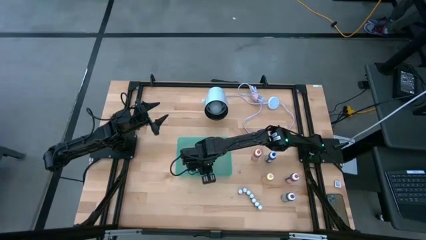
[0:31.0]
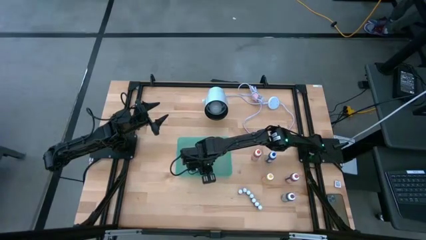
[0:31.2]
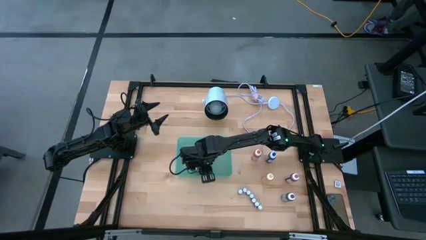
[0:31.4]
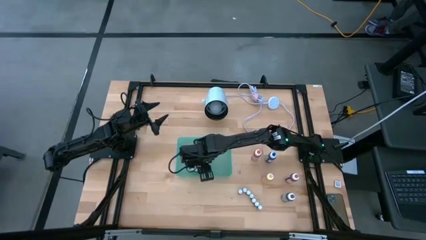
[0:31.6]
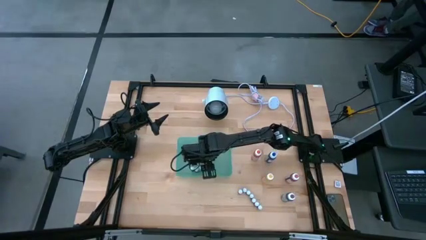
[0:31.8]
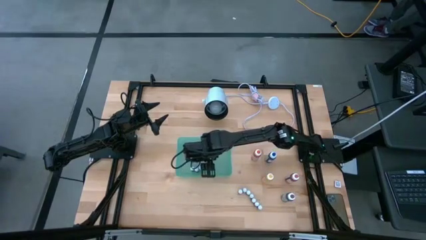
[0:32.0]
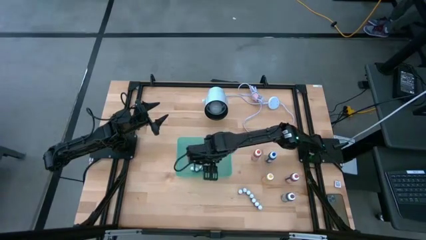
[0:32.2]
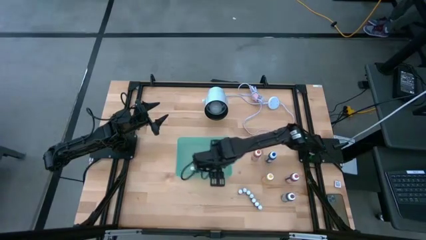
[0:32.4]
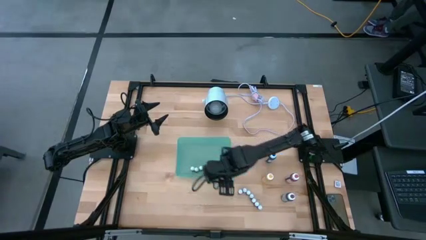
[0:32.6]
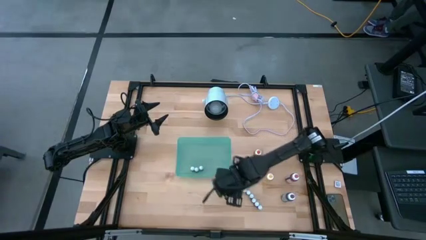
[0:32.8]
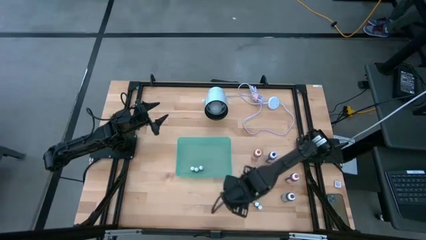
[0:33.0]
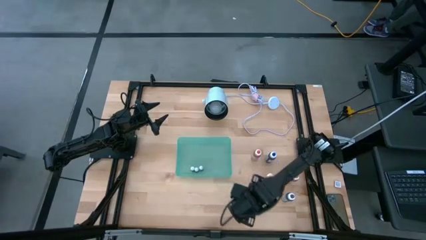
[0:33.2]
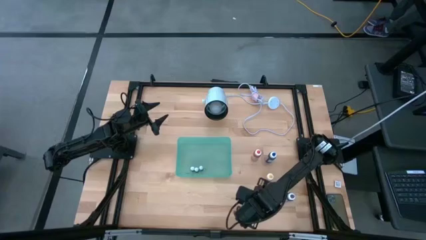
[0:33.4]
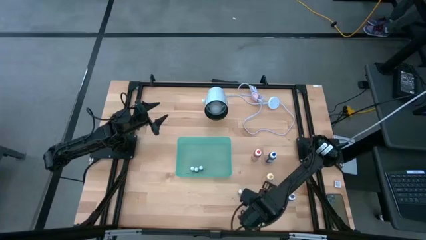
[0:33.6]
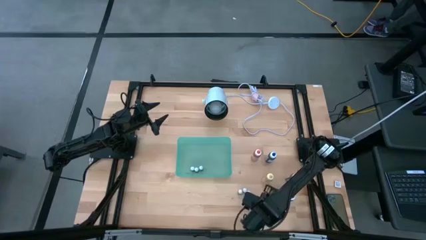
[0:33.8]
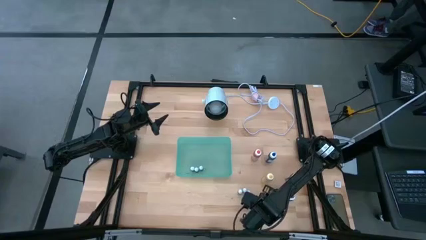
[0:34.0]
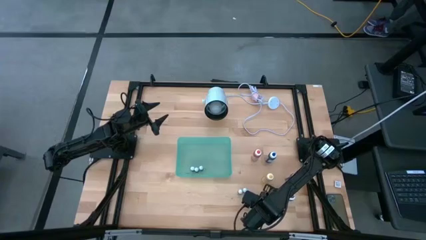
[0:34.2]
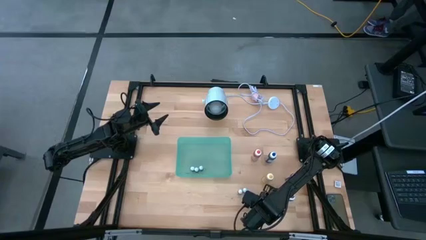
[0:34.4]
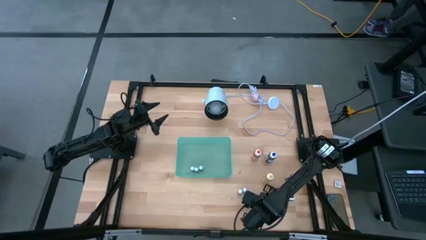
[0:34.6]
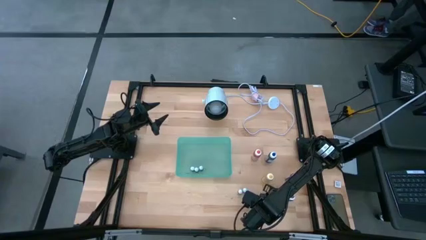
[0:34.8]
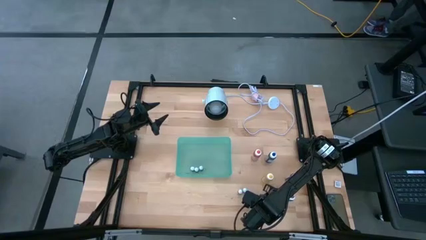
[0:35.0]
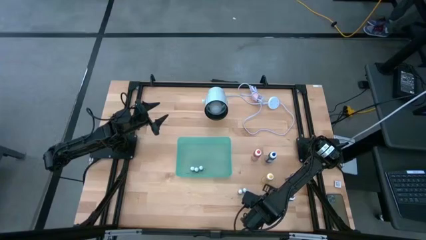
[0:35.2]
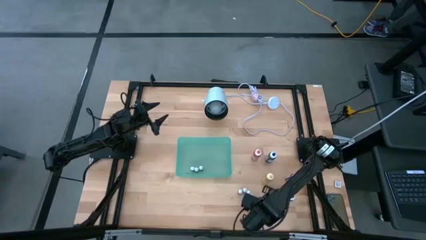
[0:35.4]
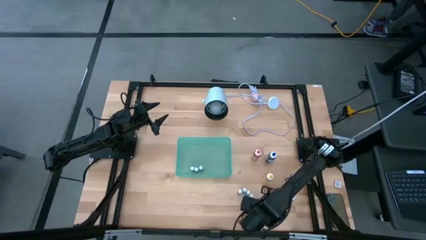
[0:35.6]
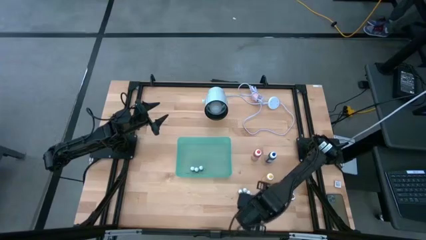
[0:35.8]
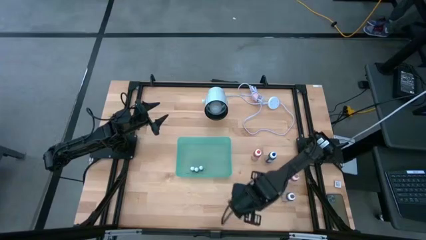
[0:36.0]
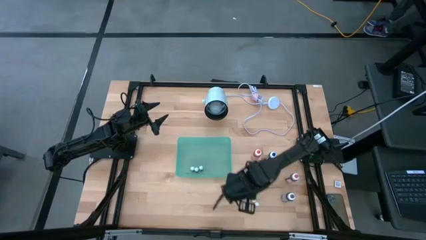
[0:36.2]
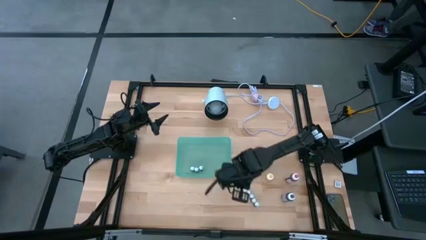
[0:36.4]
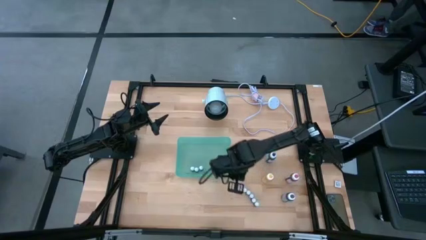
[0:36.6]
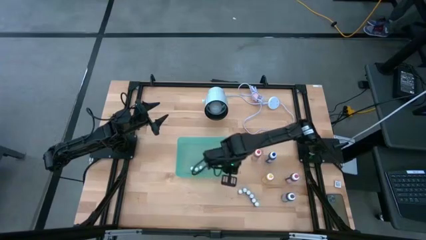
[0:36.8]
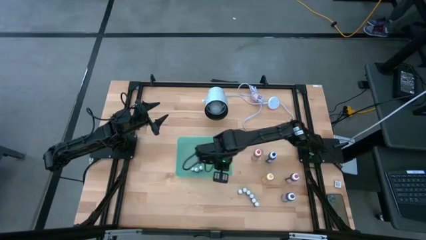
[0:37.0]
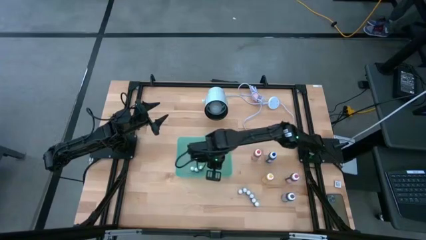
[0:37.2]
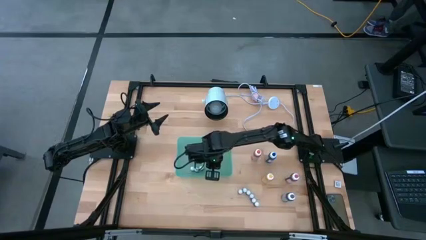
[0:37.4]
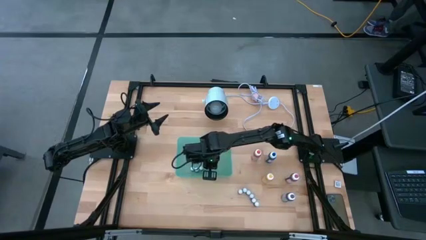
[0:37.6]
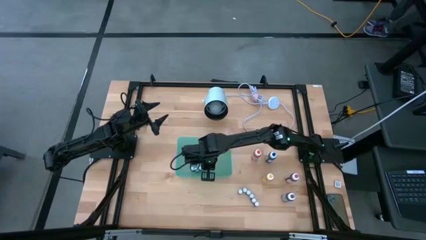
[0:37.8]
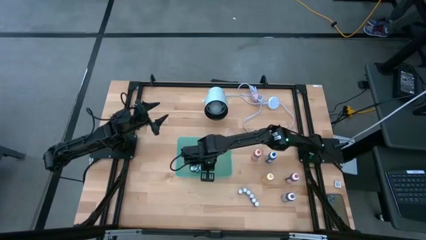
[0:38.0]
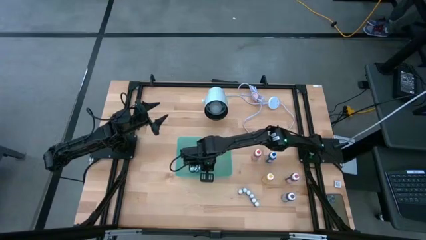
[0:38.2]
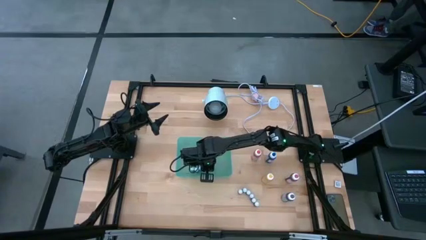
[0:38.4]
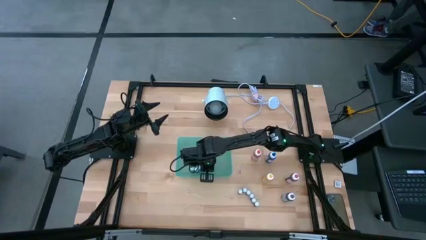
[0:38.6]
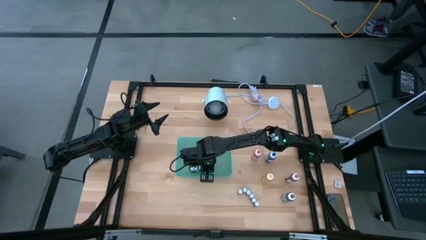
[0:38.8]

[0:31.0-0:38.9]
Task: Pick & Place food coloring
Put the small purple food coloring bottle into the bin

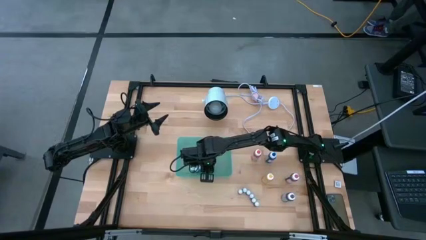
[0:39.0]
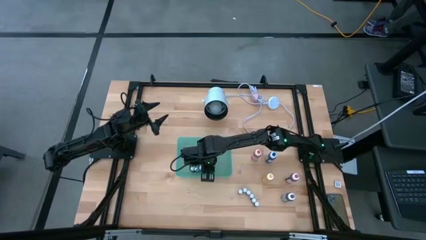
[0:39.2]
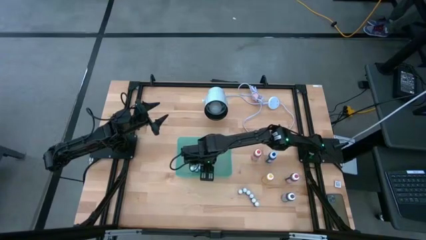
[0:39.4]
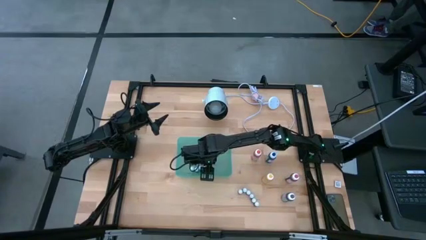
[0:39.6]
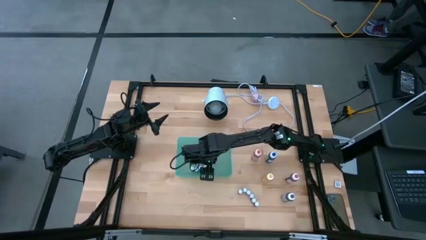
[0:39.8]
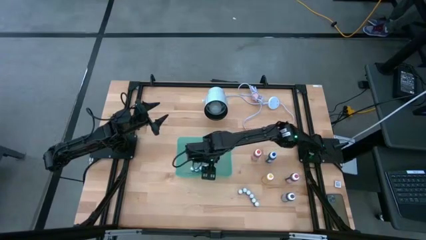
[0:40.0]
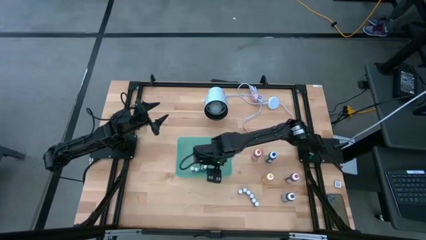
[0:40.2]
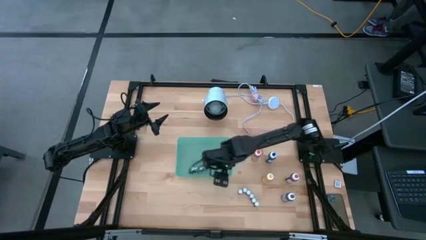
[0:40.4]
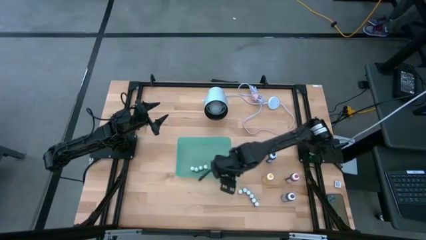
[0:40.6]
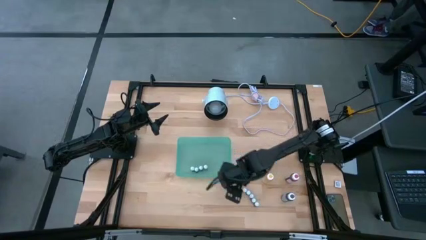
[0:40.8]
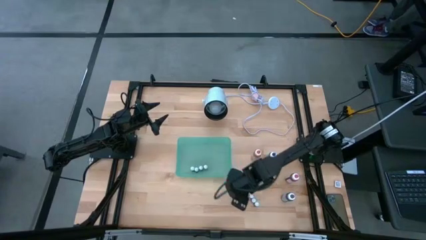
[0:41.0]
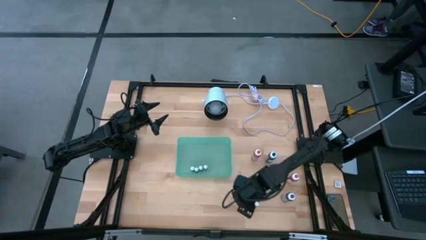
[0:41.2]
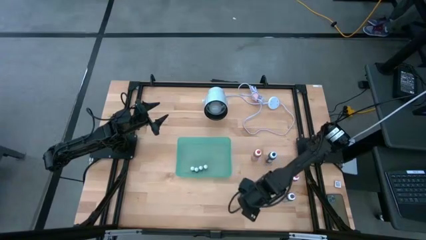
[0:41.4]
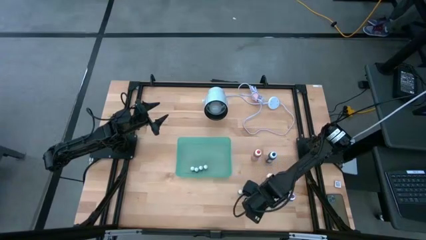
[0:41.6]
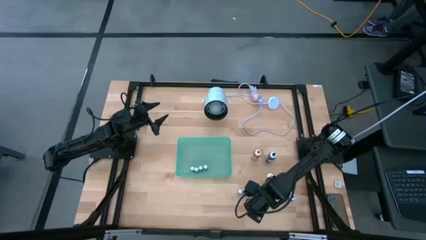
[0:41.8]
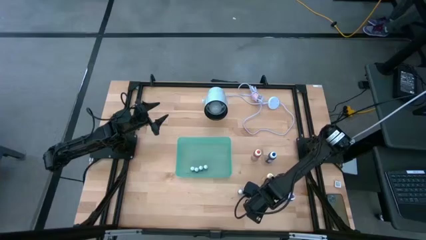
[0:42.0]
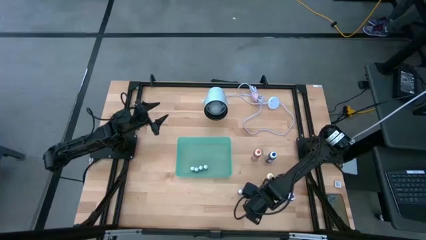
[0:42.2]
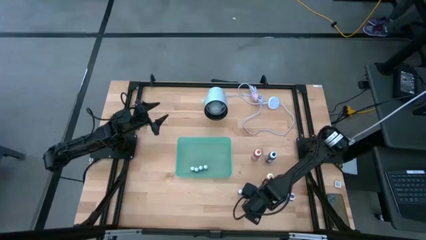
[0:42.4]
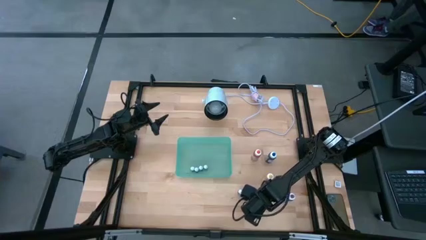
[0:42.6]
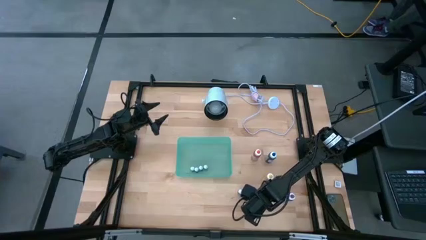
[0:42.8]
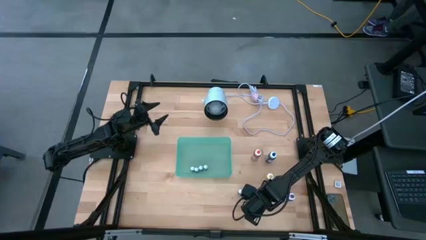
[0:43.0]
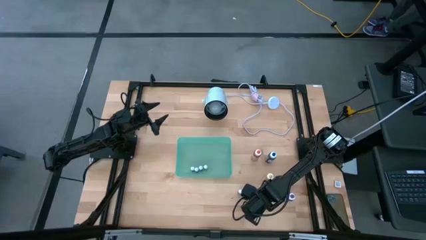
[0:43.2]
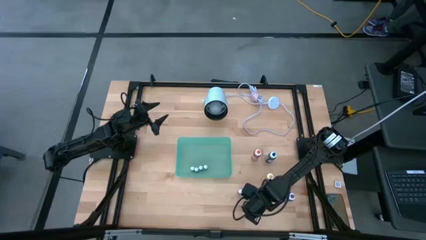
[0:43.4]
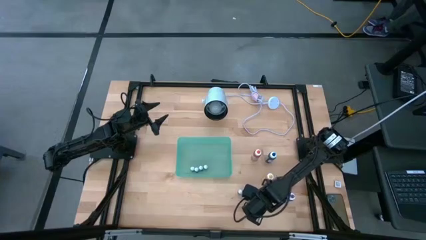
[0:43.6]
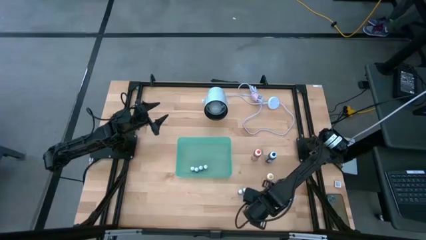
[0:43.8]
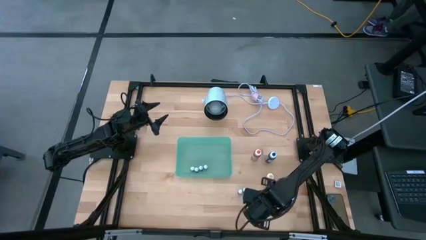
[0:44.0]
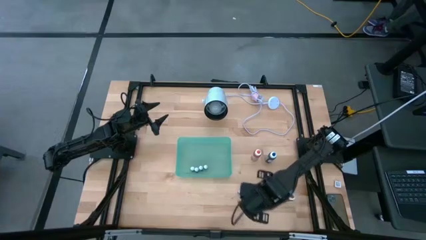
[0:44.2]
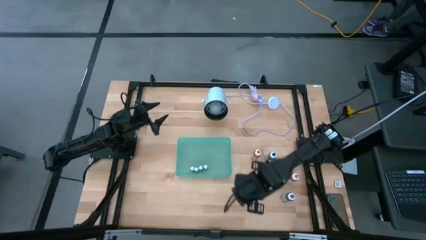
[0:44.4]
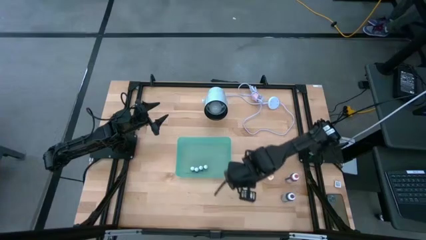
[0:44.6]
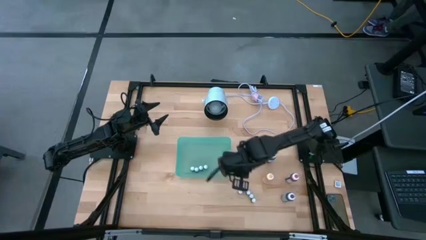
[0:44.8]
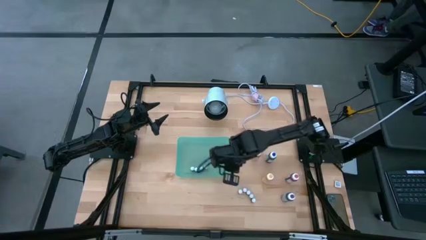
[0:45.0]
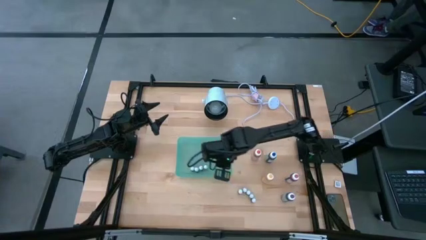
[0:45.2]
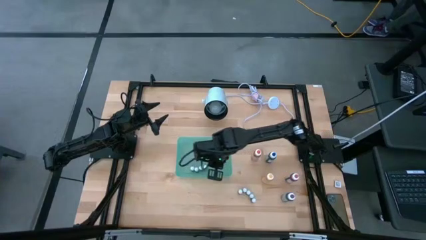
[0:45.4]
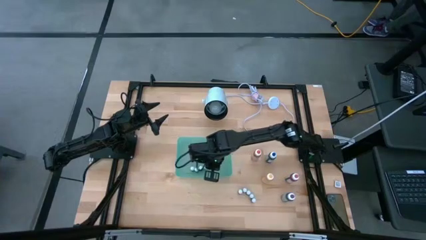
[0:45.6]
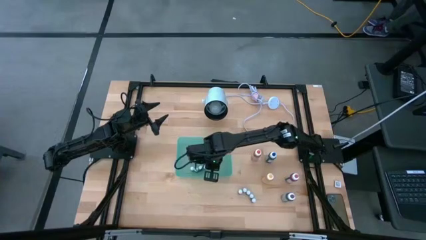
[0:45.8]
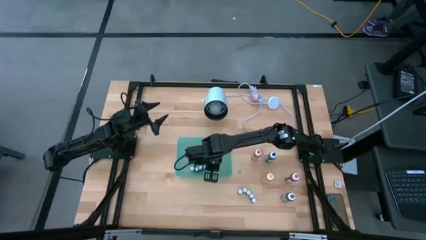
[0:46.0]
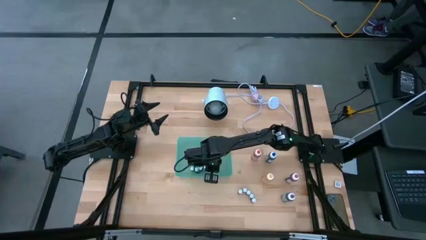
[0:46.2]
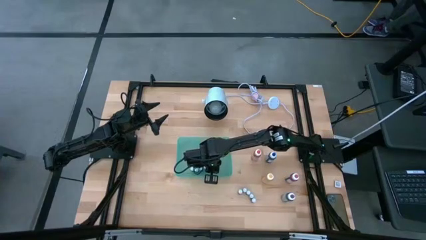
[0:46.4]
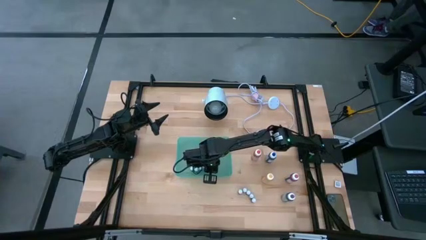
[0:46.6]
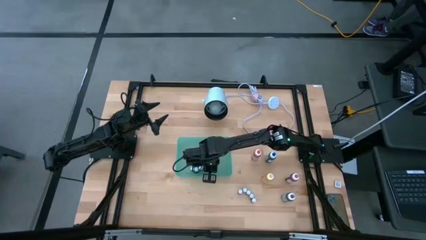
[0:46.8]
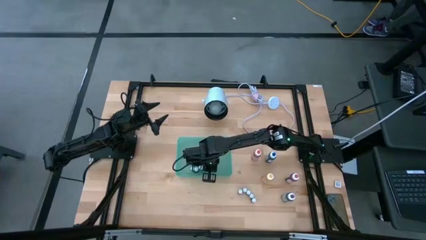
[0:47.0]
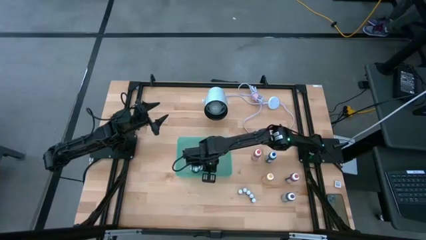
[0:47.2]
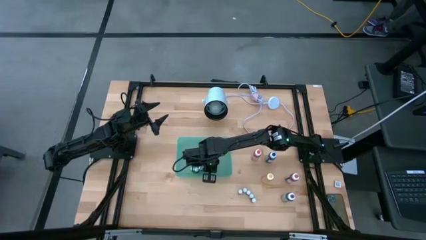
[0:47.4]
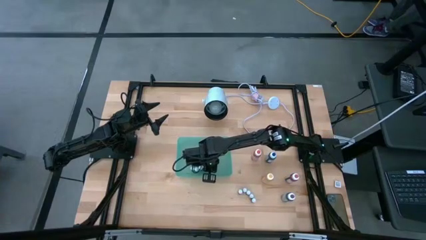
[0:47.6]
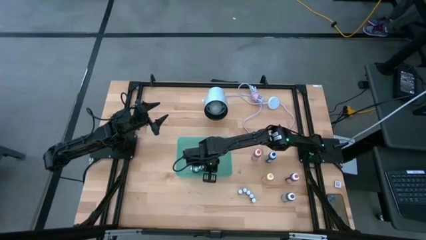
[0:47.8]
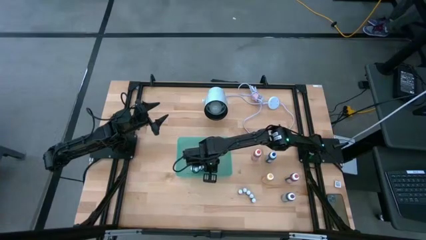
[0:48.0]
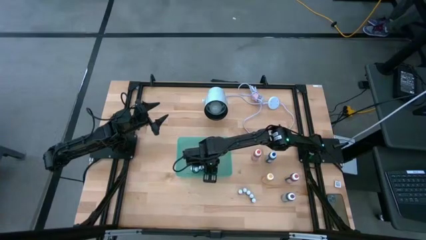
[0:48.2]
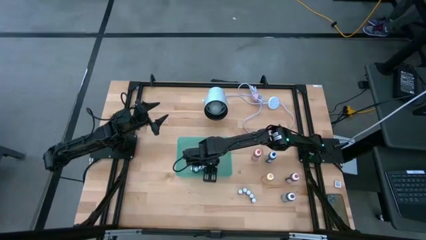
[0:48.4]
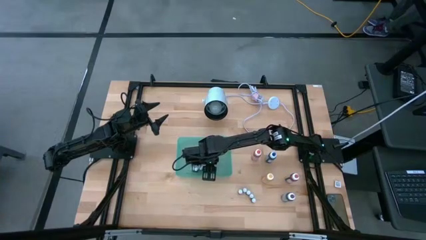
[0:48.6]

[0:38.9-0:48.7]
Put the small black food coloring bottle into the bin
